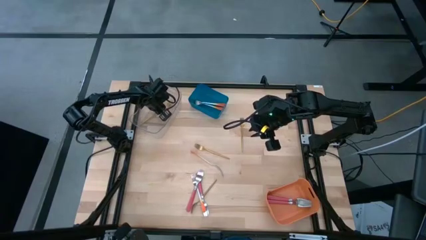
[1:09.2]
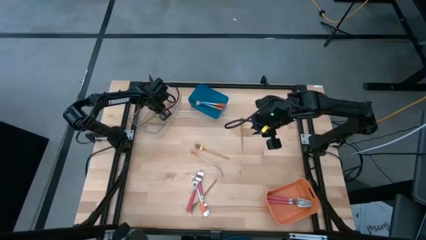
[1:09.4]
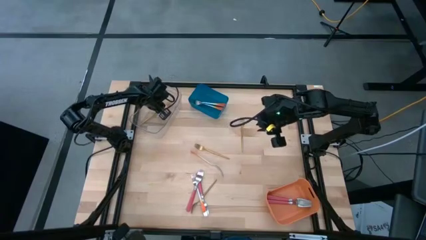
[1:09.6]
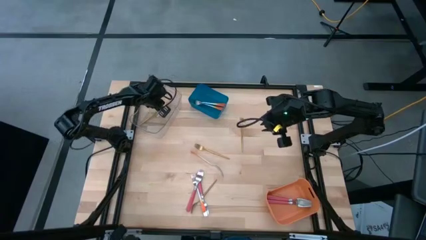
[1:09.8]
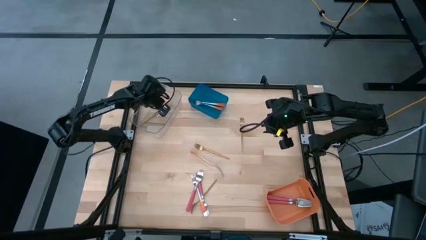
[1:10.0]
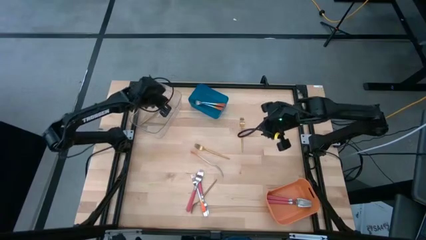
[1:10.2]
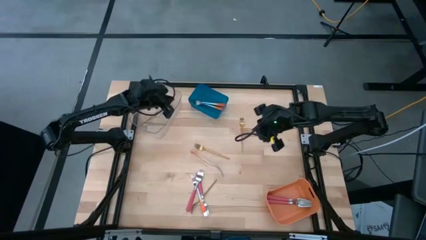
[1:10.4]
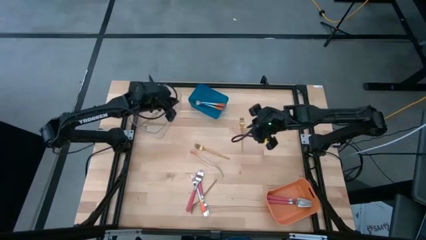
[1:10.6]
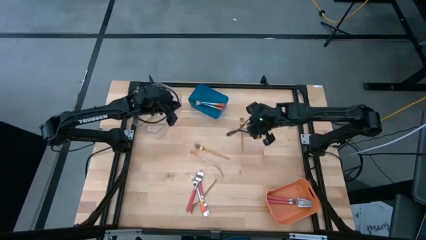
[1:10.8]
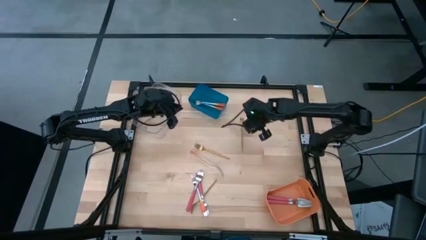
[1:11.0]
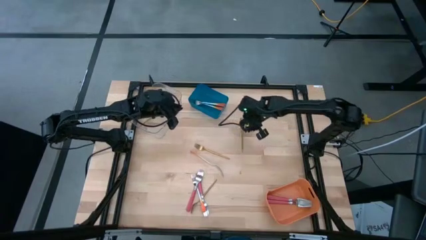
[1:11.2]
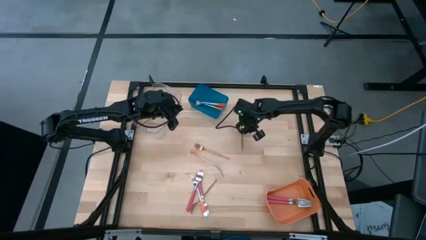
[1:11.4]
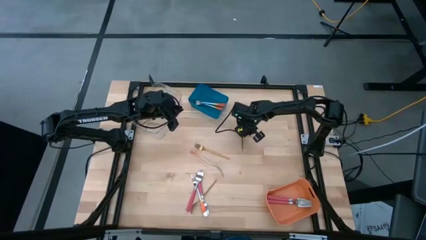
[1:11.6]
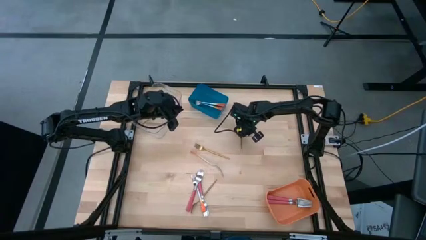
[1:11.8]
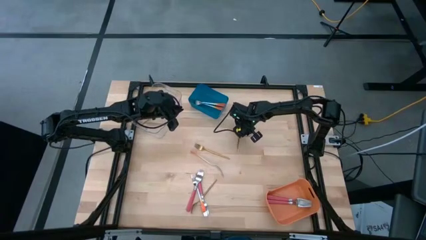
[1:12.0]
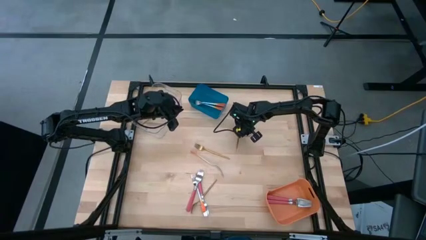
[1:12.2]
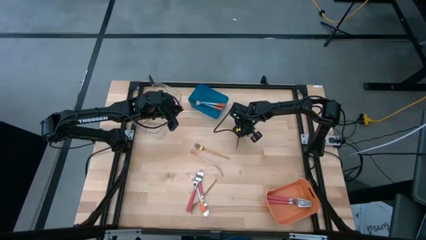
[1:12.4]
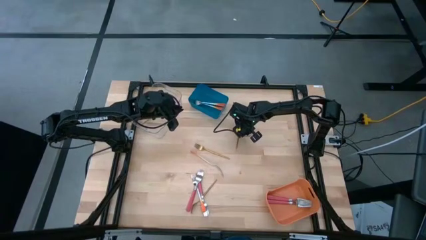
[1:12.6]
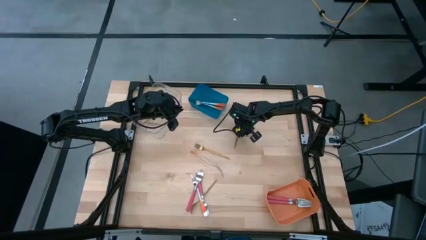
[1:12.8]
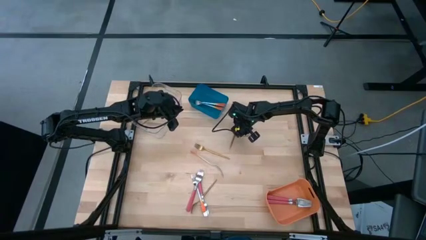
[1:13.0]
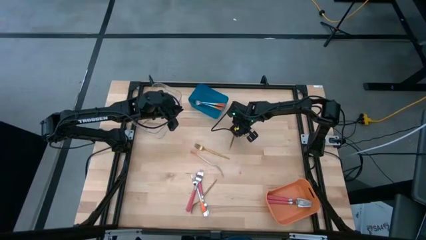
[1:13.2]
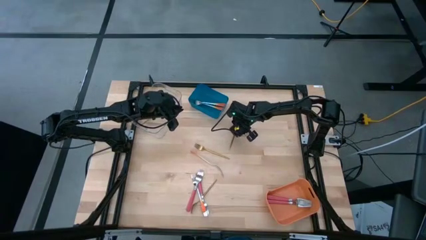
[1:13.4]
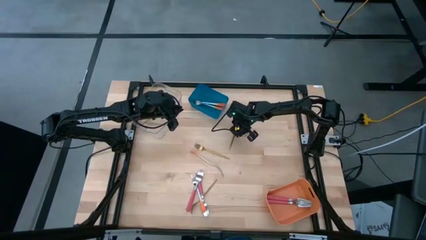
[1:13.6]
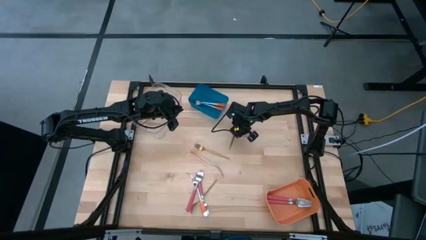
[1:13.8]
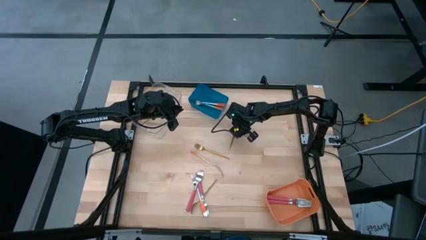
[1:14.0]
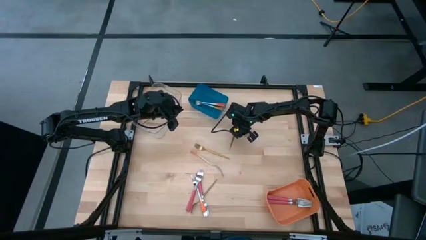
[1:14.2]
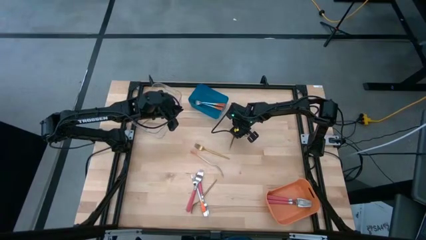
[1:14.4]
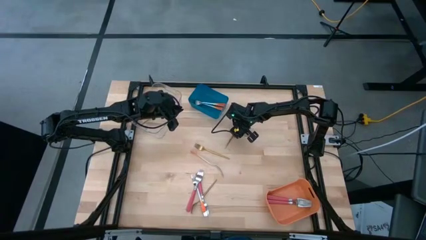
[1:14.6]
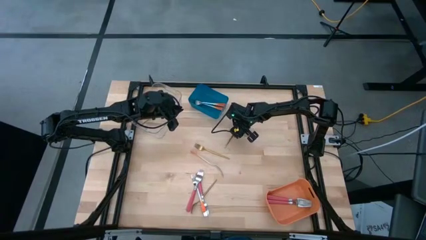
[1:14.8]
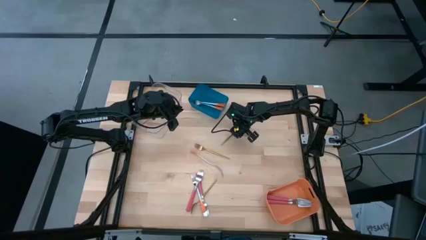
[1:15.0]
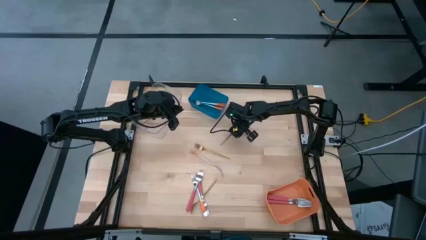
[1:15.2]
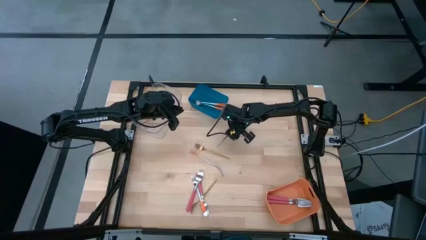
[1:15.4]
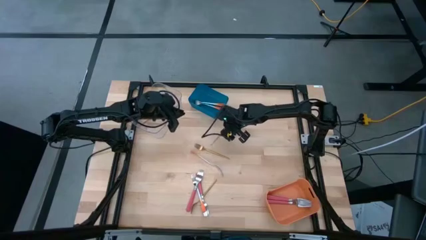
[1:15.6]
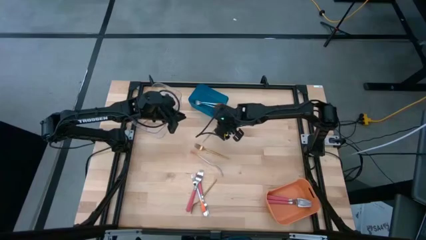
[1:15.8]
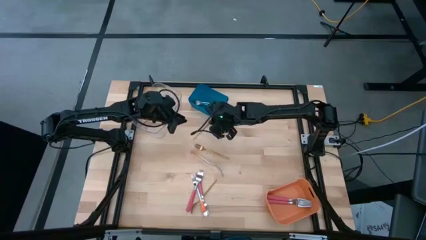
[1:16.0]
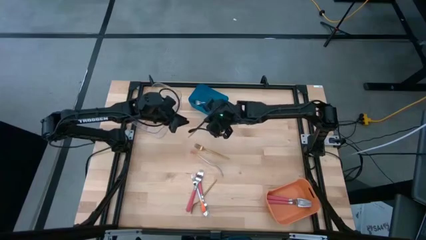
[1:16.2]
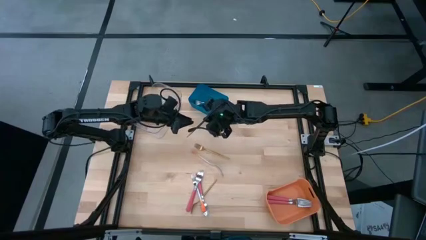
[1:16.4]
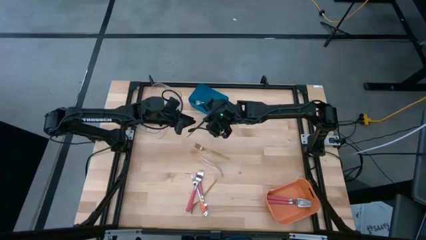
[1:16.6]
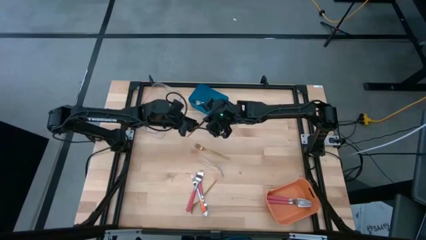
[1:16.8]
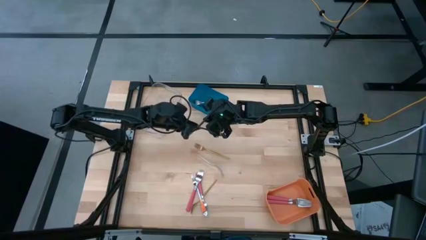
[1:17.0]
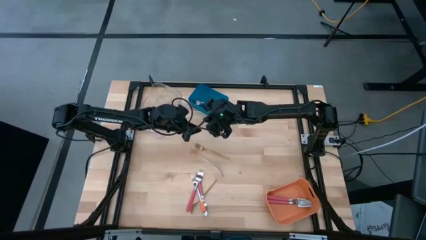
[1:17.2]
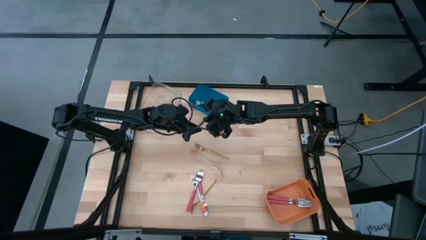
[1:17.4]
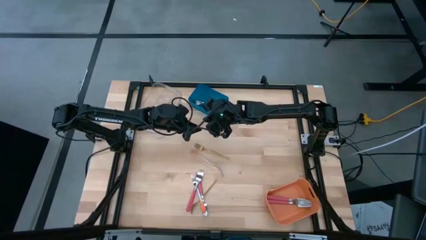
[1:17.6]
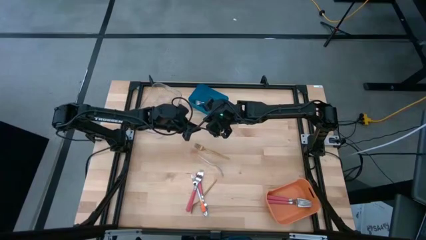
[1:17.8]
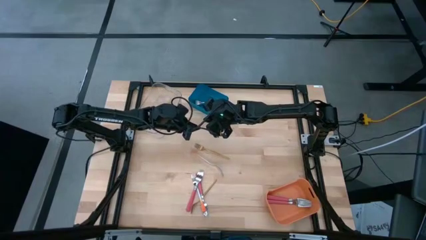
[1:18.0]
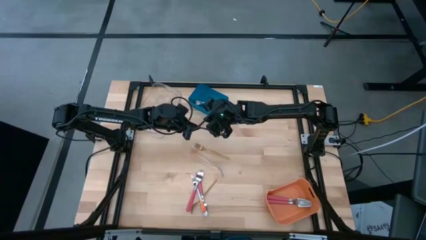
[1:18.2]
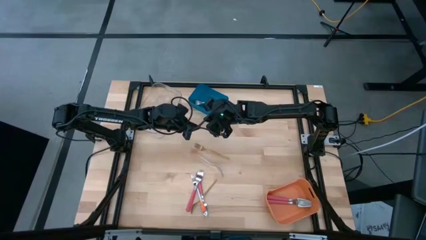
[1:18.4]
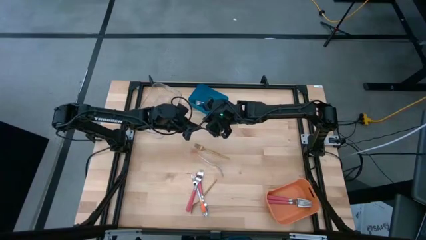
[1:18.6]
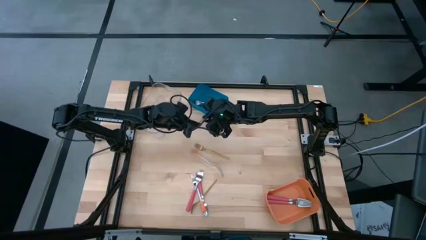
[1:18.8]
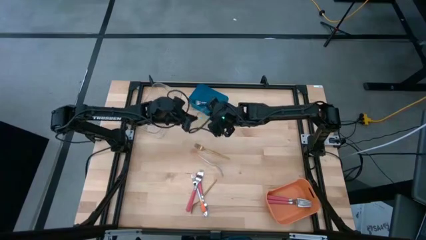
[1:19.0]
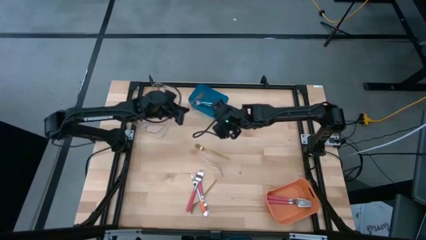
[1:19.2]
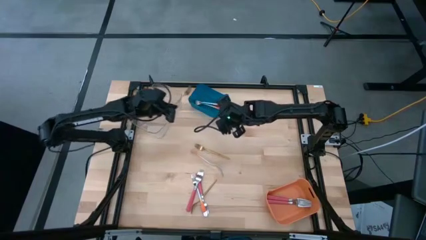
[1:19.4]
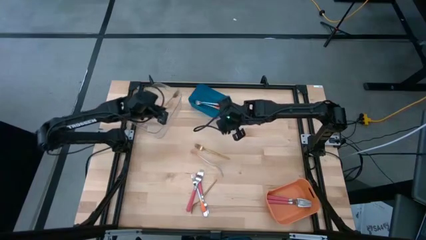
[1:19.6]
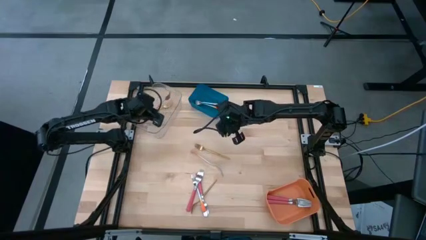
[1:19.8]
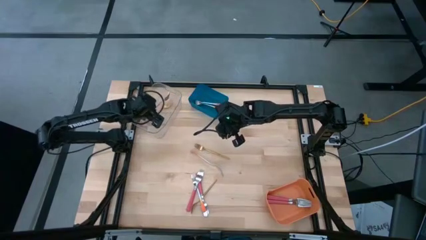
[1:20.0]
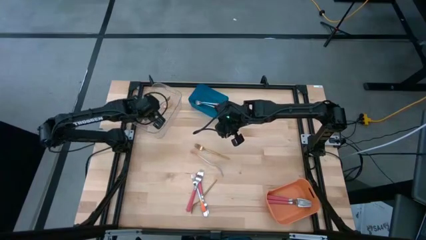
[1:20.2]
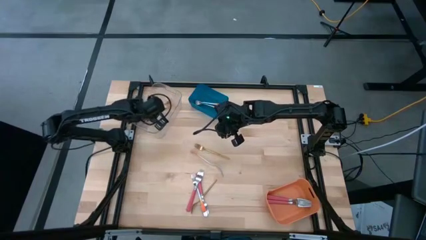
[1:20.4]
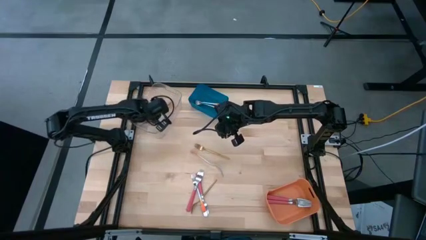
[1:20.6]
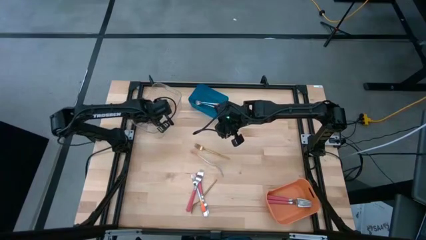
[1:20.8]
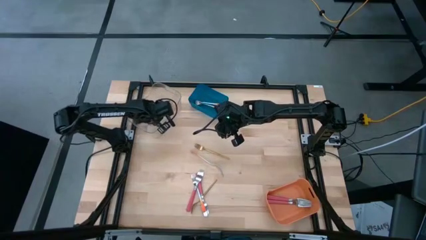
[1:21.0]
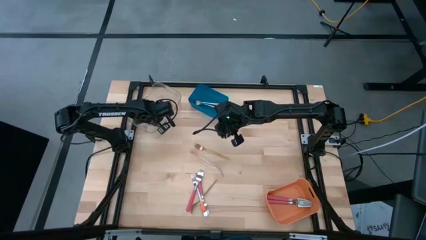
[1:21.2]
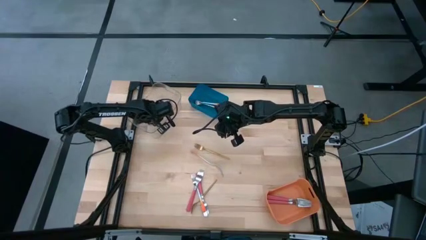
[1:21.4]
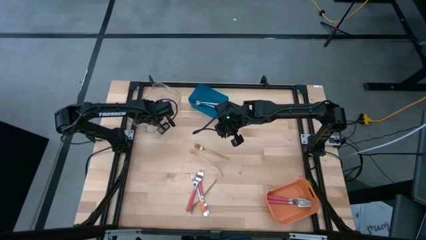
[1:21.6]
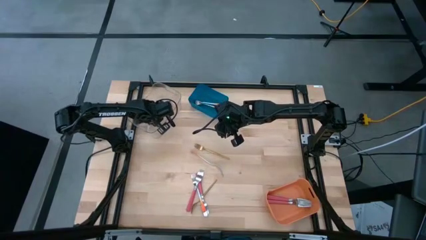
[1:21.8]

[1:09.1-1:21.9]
Task: Sort silverware by color (type)
Put the gold fork into the transparent bin
